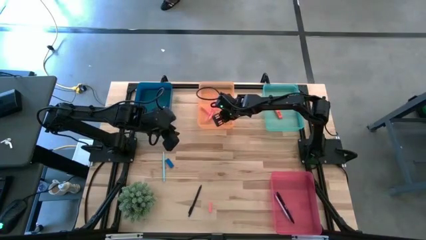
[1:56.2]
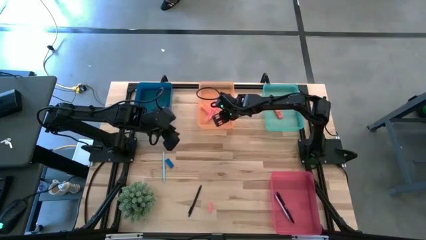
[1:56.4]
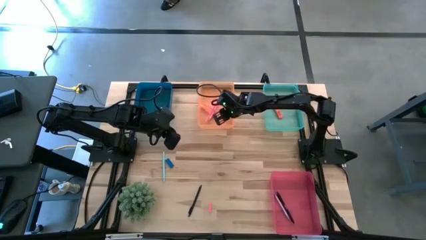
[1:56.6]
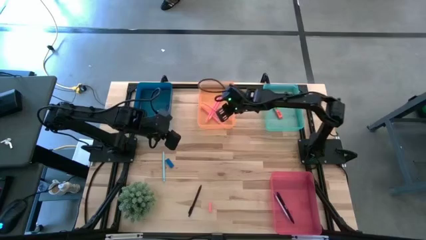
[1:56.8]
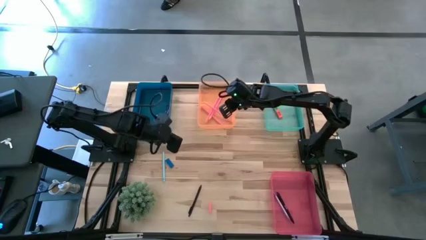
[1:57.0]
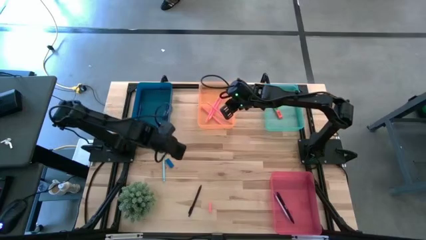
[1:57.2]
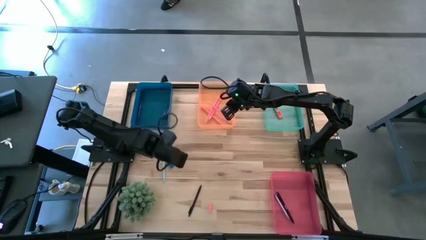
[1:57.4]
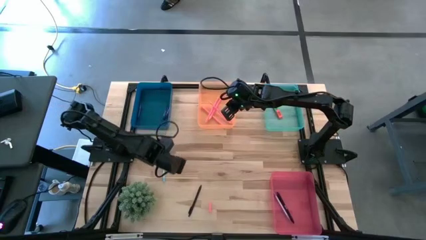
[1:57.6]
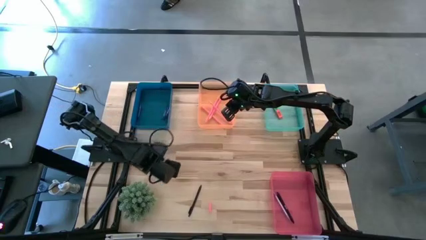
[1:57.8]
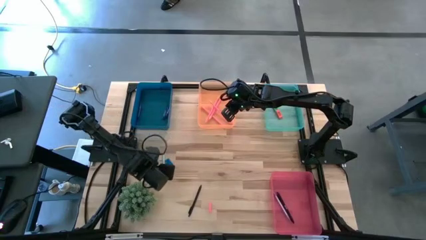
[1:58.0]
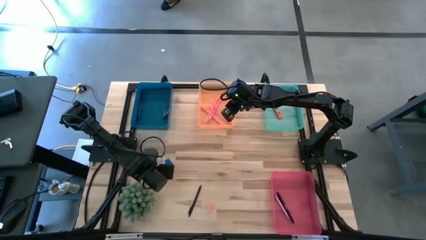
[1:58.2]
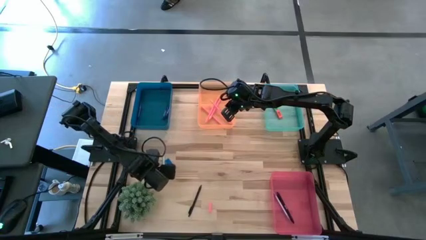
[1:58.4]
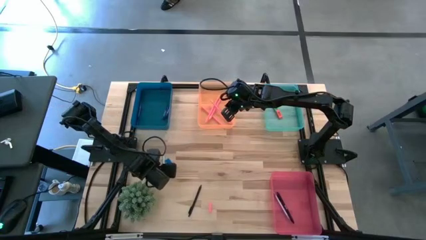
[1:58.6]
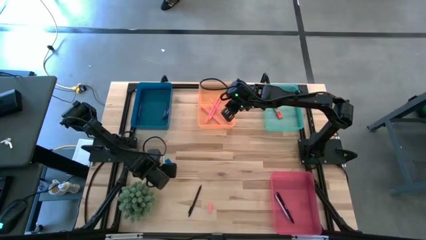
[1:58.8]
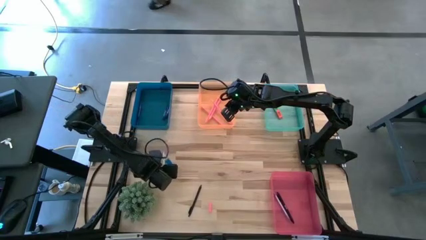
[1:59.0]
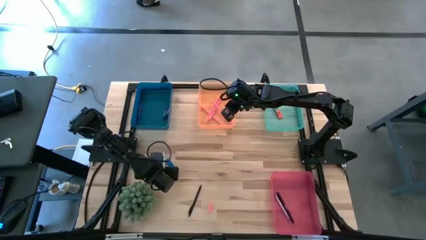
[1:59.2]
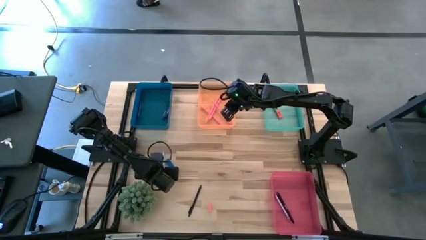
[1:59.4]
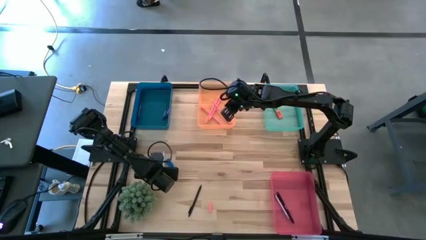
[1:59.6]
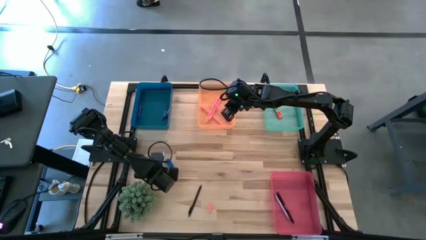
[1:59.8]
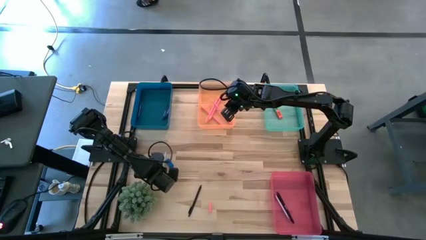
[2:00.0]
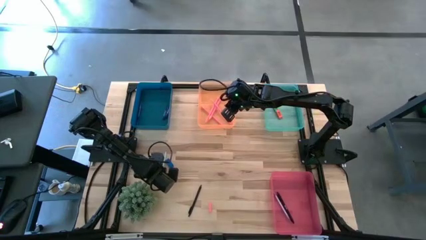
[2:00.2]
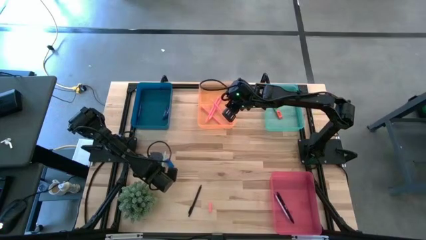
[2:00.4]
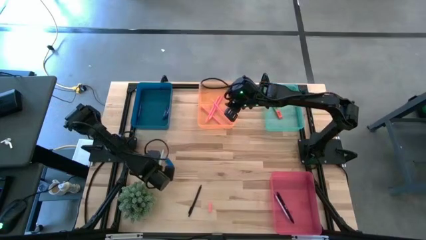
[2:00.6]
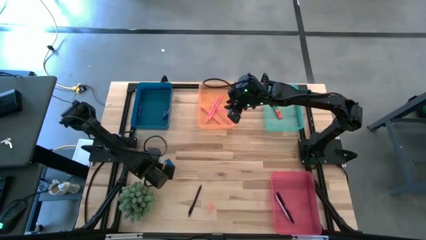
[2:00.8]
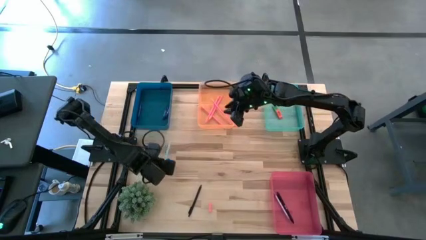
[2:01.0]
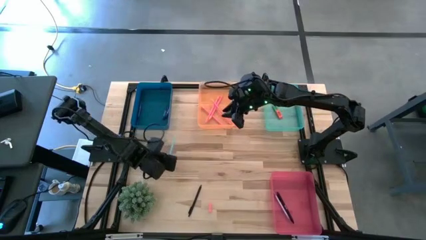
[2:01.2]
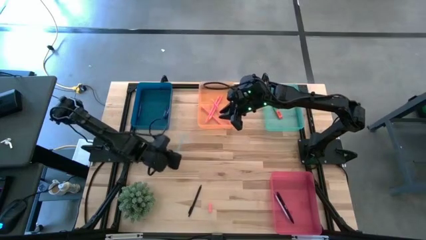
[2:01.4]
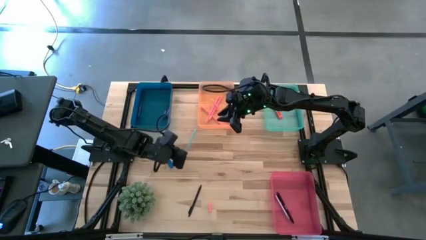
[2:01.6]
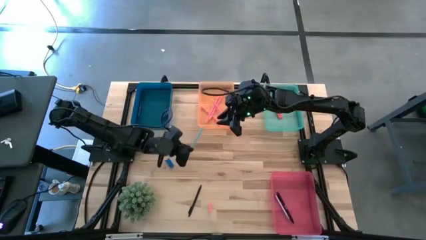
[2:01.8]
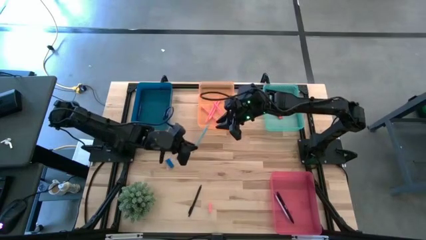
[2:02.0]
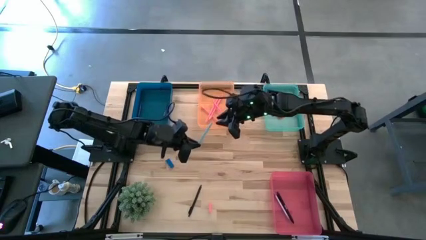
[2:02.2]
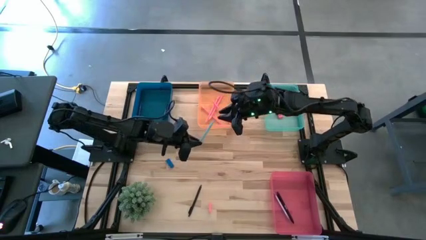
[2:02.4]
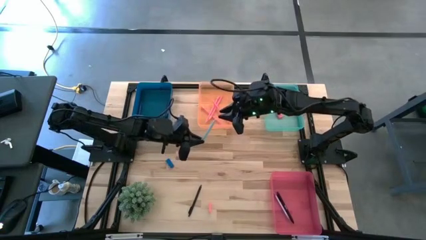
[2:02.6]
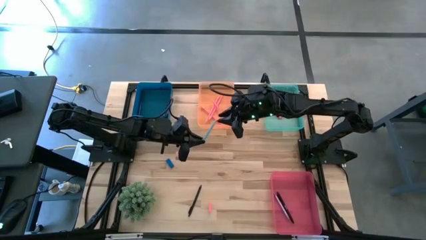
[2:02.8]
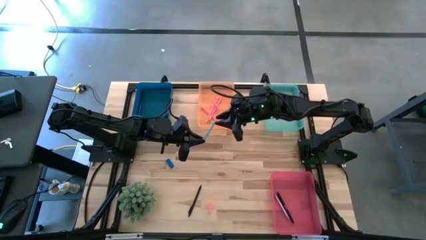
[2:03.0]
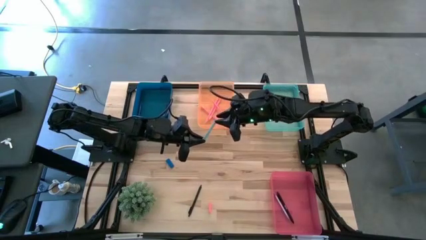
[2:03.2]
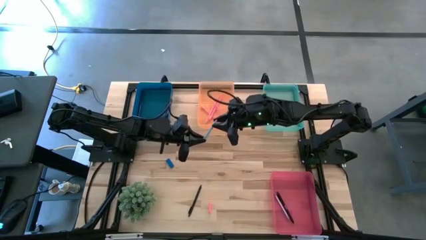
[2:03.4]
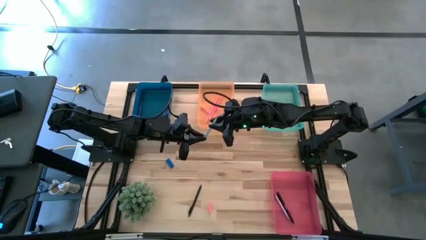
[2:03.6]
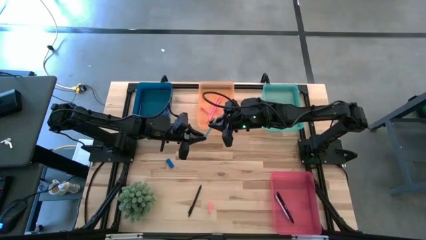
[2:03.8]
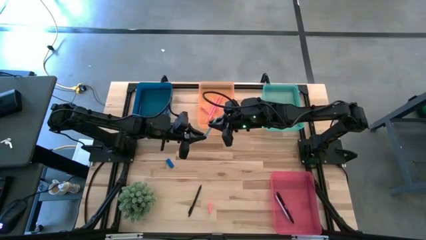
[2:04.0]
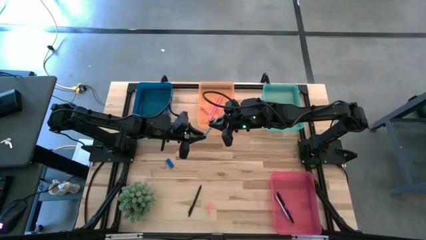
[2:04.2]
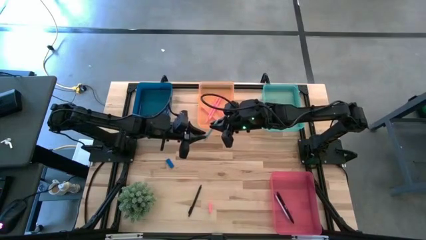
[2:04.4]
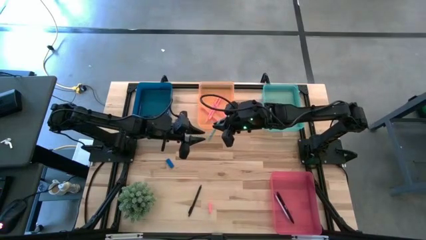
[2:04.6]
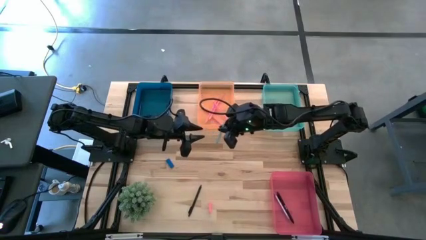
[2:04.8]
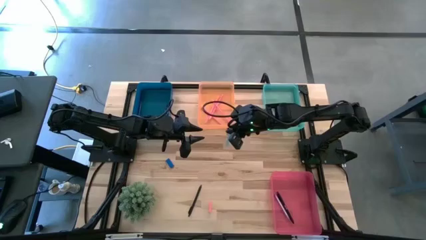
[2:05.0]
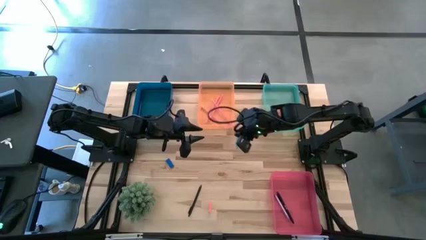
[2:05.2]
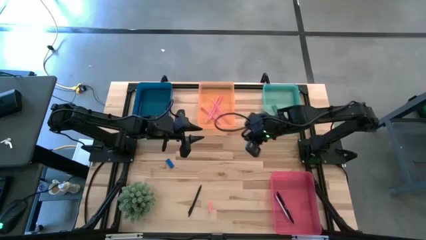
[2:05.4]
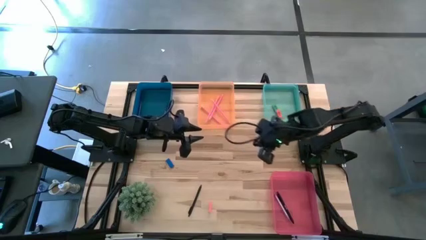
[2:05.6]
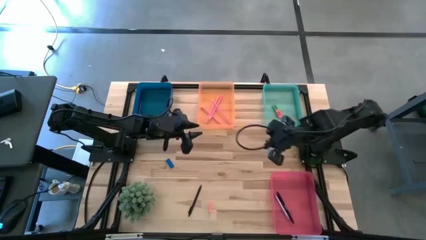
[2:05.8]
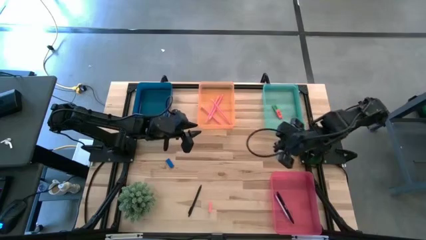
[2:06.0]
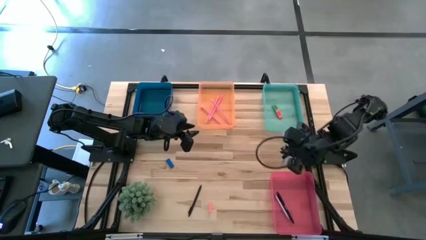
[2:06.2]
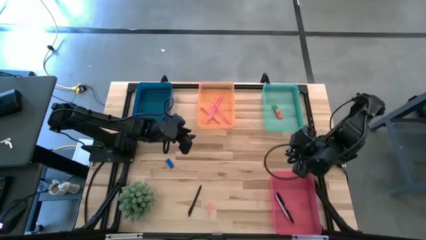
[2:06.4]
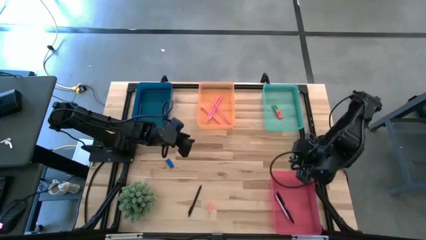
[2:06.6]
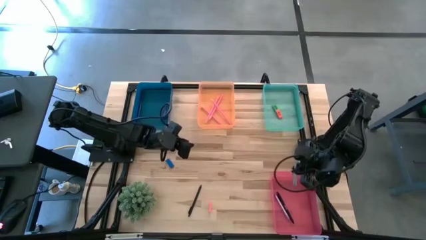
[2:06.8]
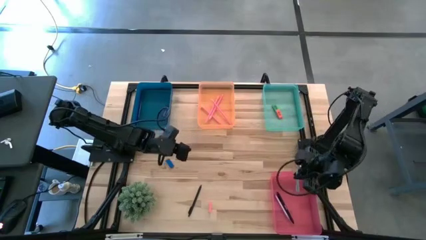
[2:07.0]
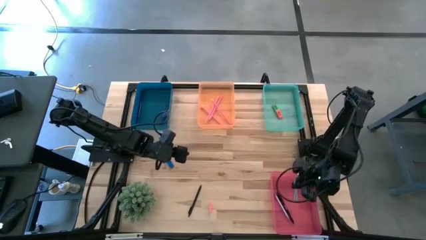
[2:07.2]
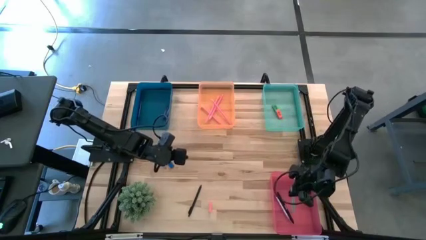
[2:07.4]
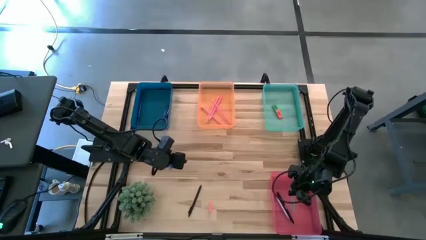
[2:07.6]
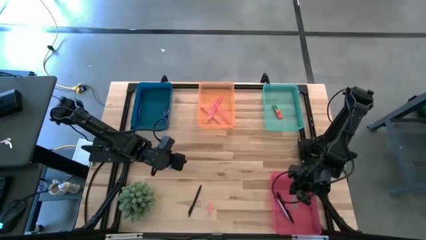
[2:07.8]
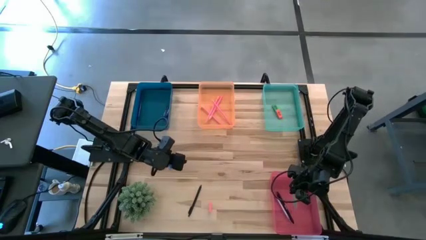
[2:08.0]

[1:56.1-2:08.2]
Task: Sort crayons/erasers/pens/pencils in bins
Put the blue pen into the pink bin

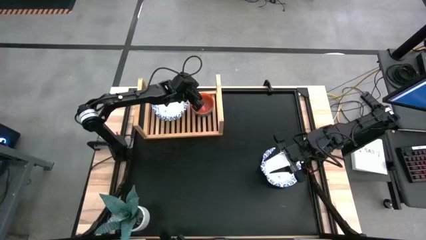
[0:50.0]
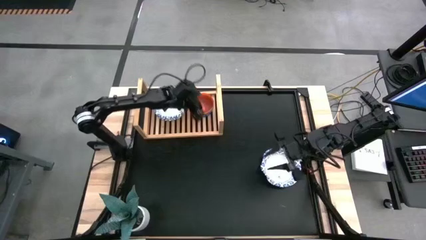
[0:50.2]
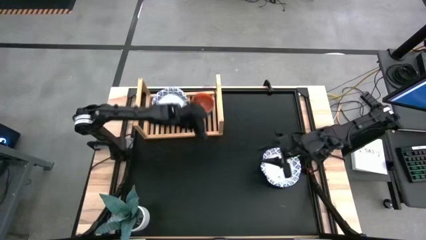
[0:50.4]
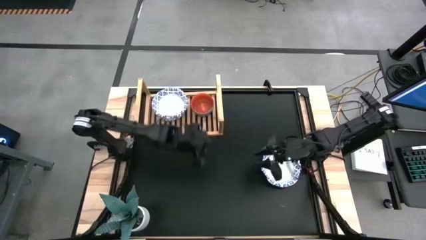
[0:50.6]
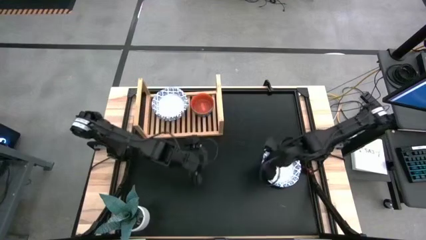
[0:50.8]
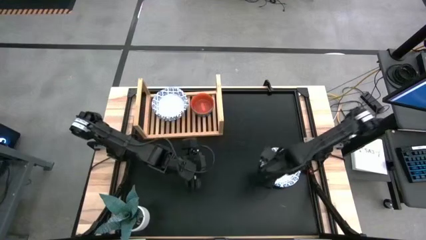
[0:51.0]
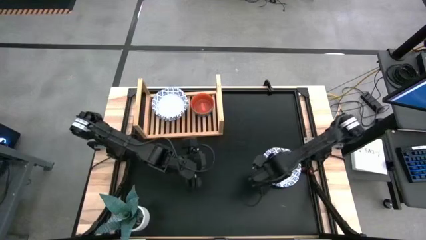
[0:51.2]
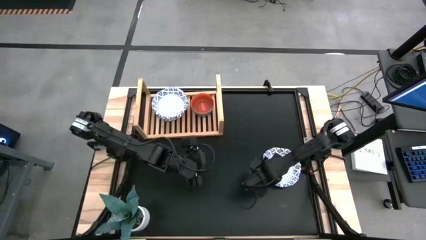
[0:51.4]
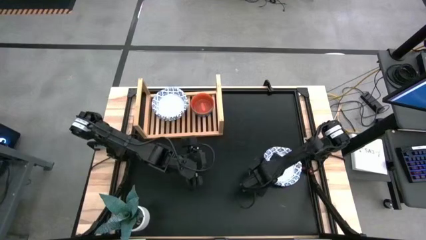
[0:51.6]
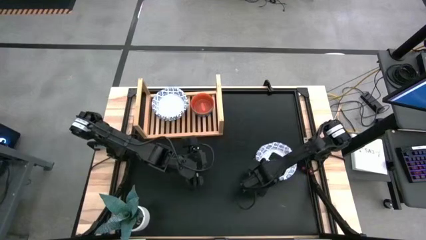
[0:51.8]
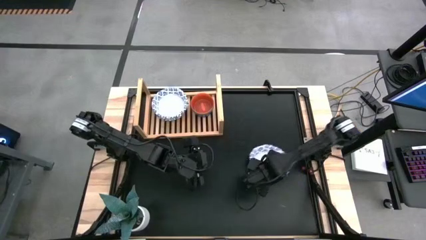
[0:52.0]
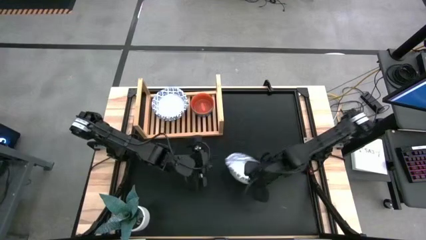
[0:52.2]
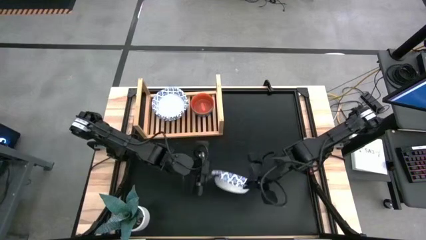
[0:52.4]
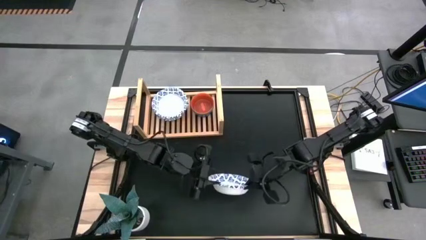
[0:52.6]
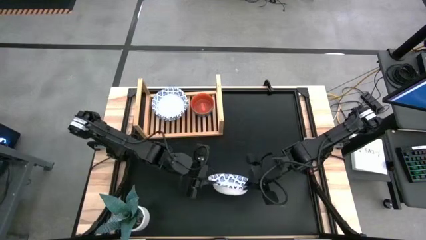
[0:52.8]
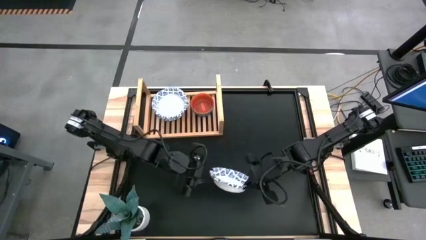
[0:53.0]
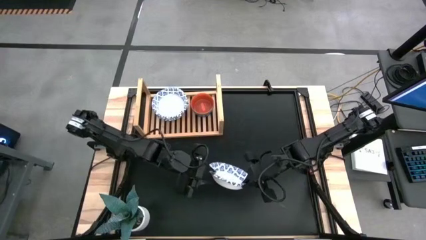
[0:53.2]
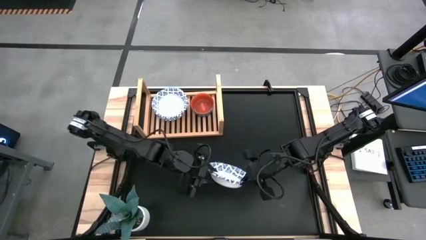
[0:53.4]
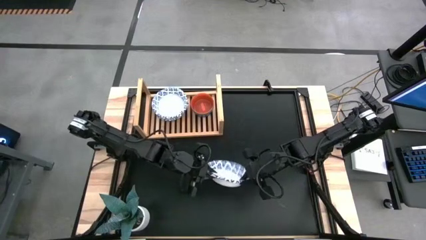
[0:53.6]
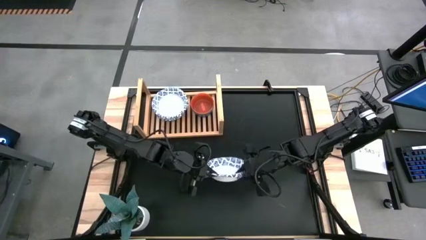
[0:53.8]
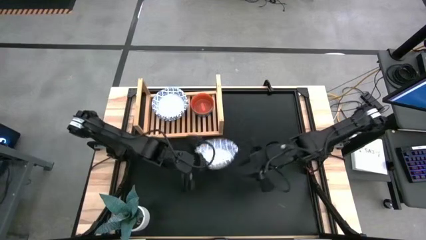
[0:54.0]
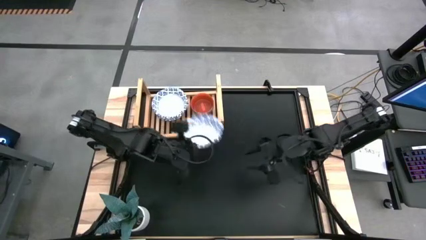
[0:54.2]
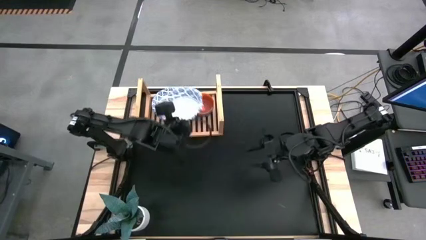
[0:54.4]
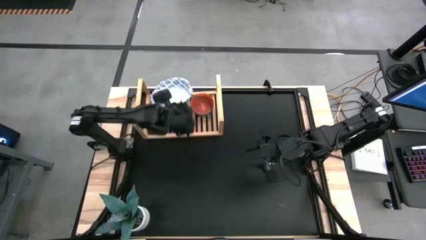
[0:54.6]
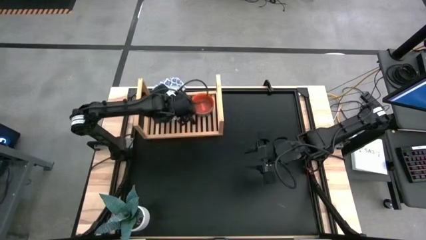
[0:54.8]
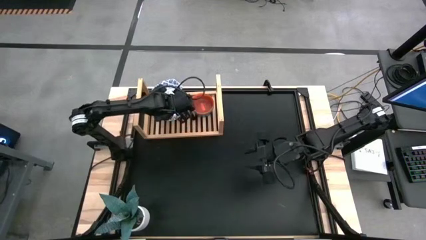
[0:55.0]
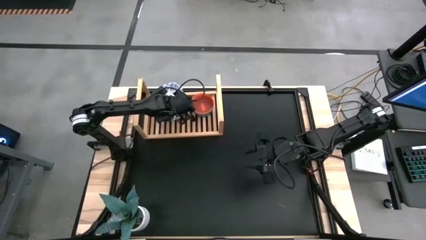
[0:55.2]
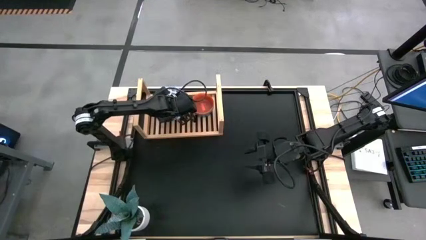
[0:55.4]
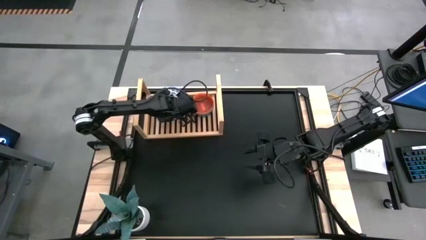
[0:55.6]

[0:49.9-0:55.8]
Task: Place and stack bowls onto a shelf
Stack the white patterned bowl on top of the other white patterned bowl on the shelf
